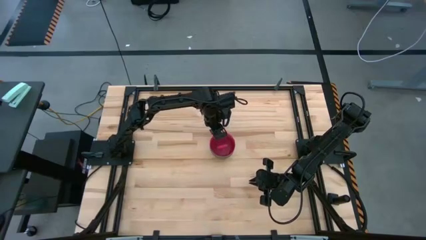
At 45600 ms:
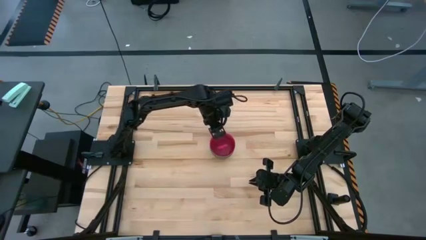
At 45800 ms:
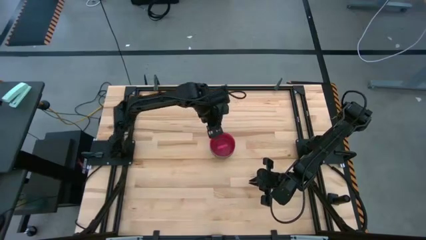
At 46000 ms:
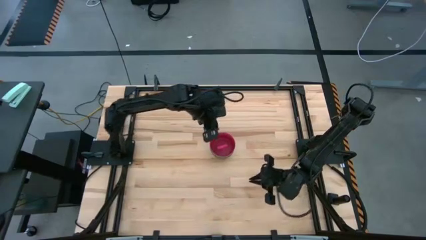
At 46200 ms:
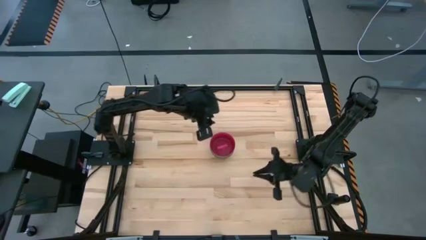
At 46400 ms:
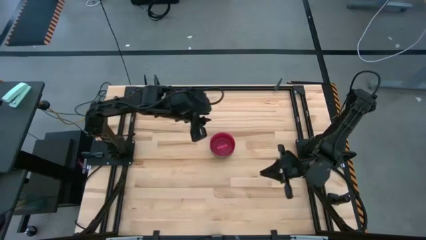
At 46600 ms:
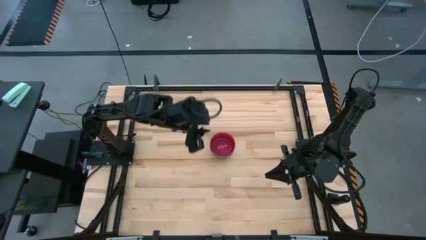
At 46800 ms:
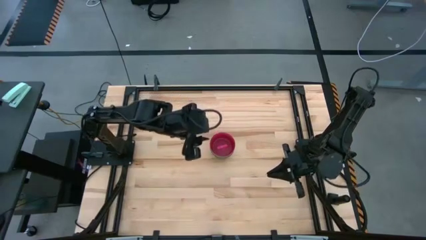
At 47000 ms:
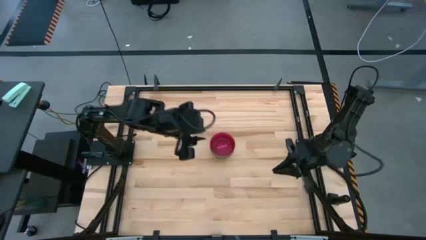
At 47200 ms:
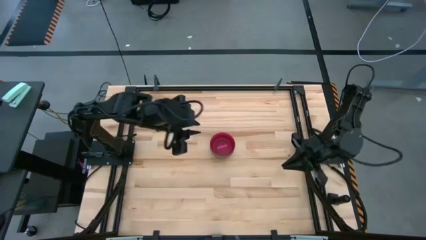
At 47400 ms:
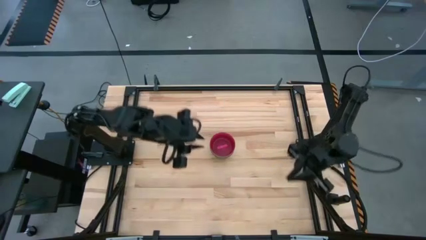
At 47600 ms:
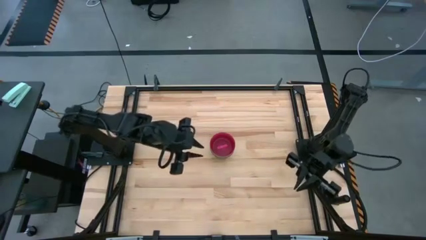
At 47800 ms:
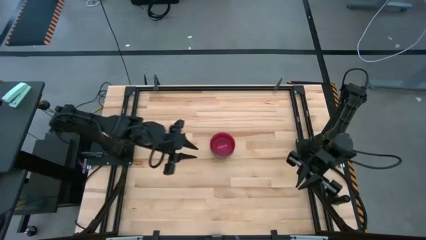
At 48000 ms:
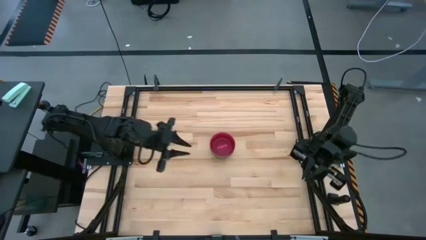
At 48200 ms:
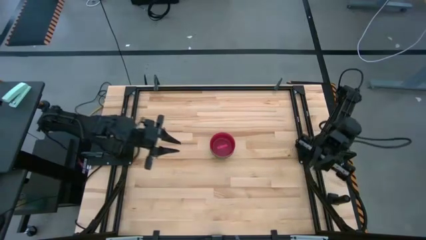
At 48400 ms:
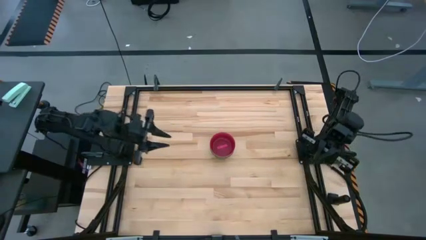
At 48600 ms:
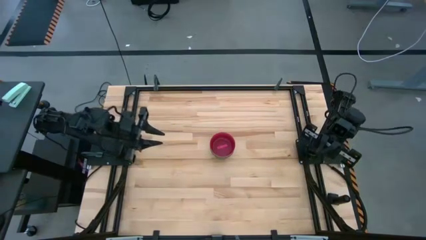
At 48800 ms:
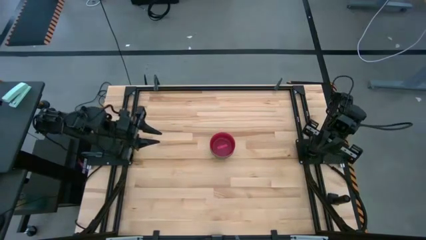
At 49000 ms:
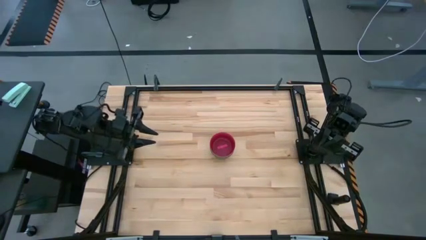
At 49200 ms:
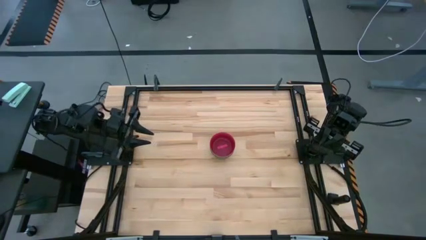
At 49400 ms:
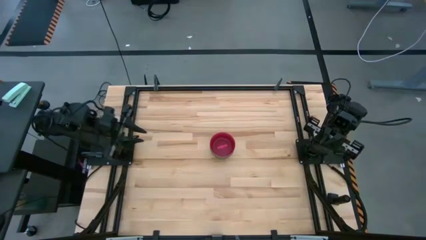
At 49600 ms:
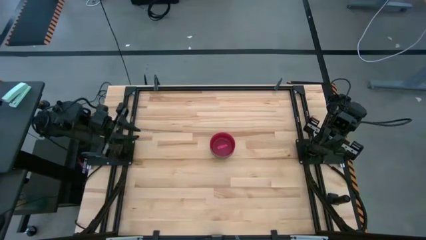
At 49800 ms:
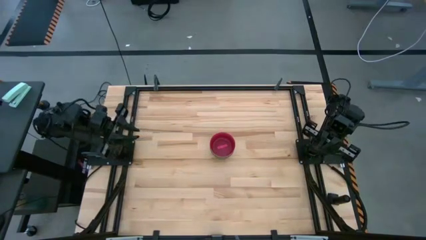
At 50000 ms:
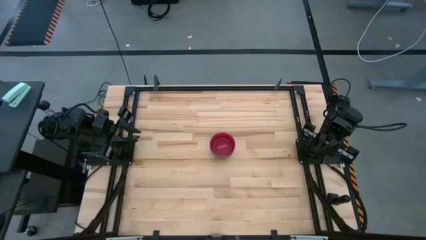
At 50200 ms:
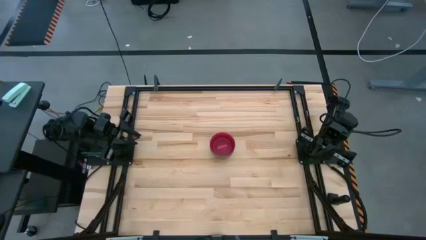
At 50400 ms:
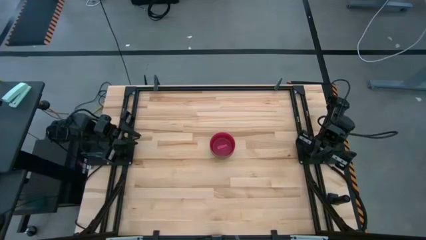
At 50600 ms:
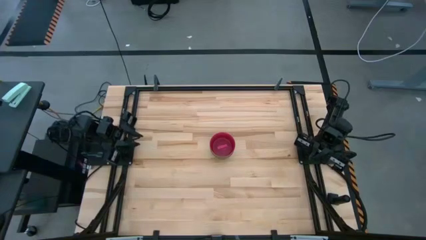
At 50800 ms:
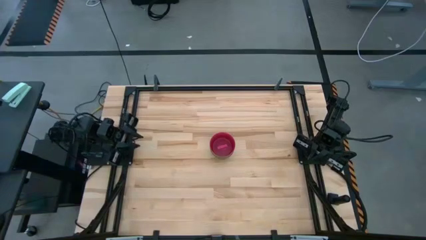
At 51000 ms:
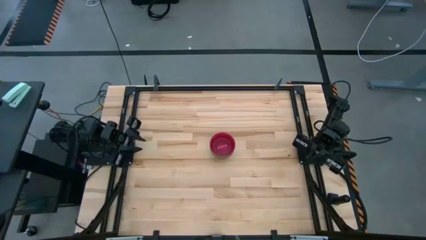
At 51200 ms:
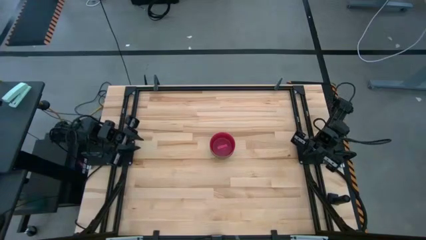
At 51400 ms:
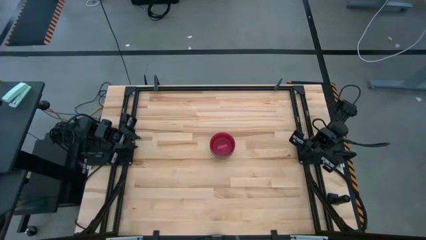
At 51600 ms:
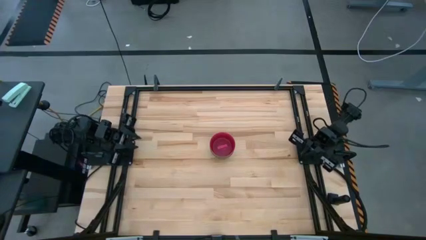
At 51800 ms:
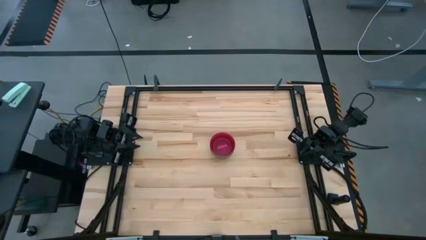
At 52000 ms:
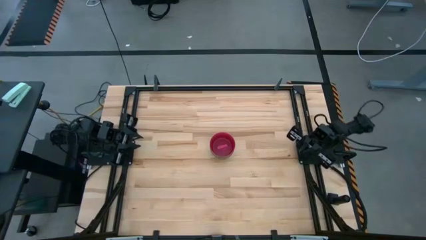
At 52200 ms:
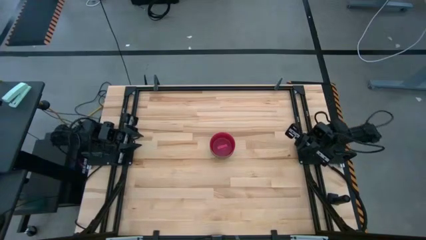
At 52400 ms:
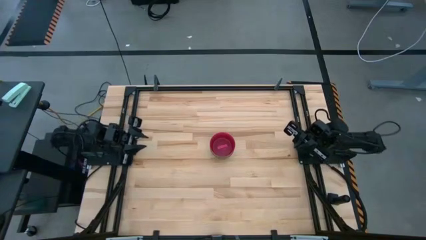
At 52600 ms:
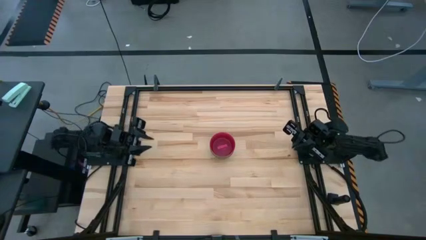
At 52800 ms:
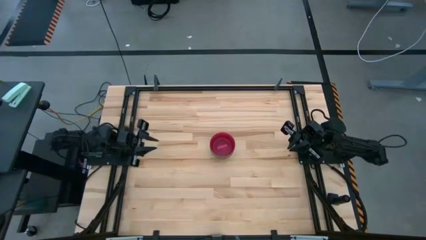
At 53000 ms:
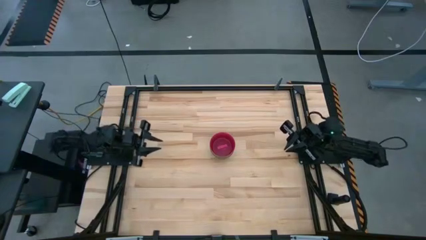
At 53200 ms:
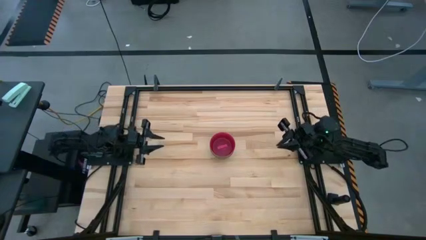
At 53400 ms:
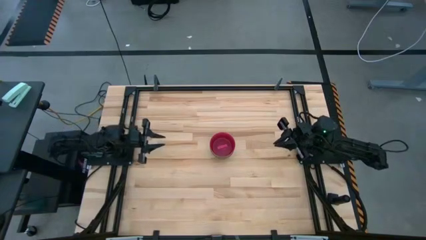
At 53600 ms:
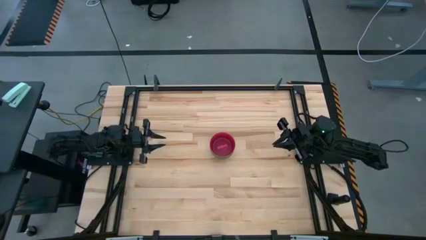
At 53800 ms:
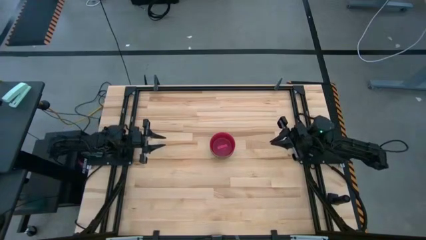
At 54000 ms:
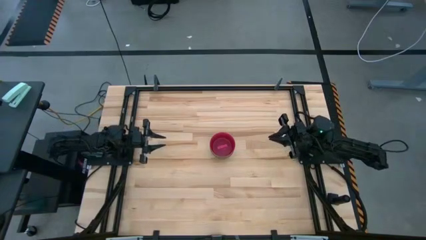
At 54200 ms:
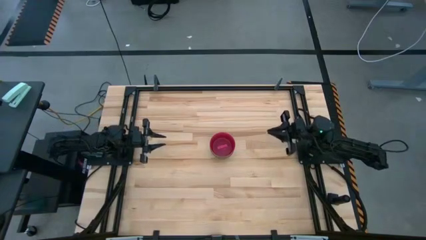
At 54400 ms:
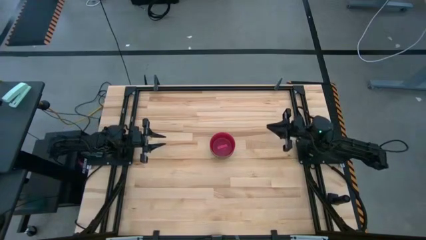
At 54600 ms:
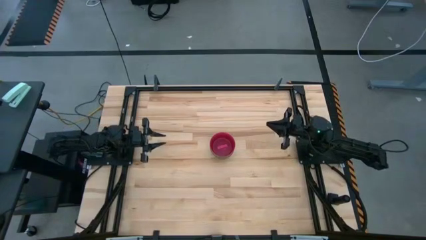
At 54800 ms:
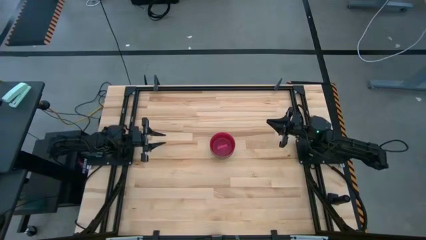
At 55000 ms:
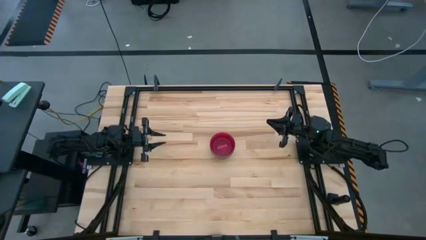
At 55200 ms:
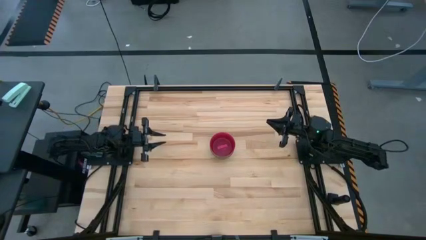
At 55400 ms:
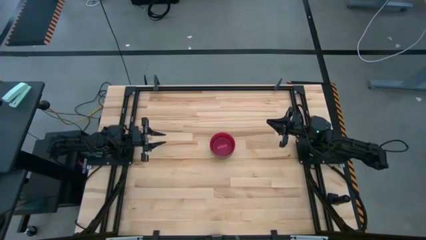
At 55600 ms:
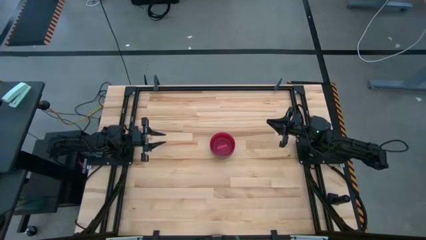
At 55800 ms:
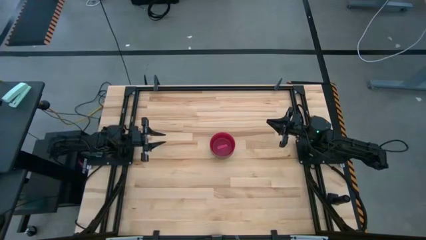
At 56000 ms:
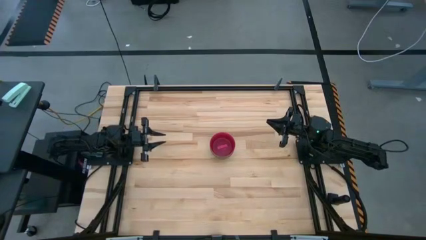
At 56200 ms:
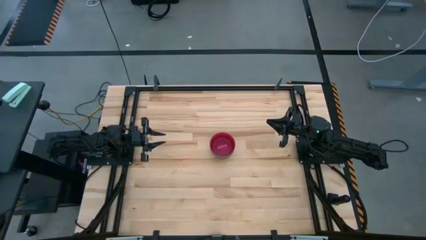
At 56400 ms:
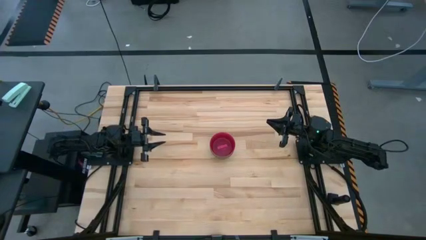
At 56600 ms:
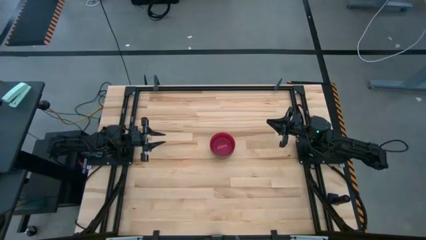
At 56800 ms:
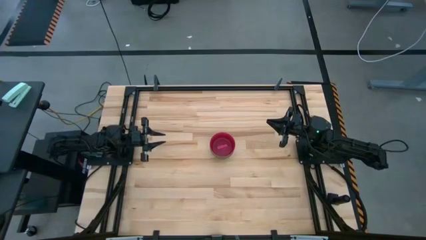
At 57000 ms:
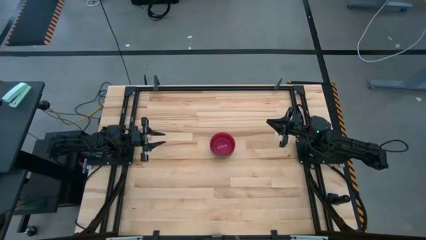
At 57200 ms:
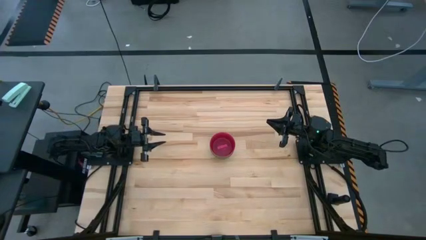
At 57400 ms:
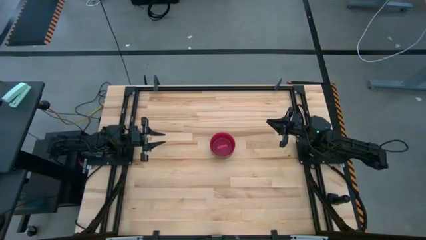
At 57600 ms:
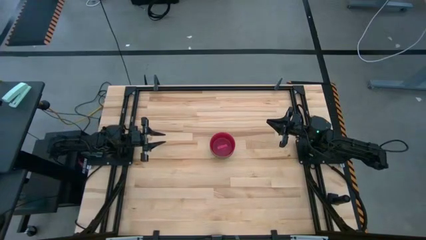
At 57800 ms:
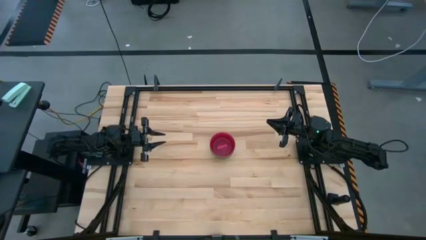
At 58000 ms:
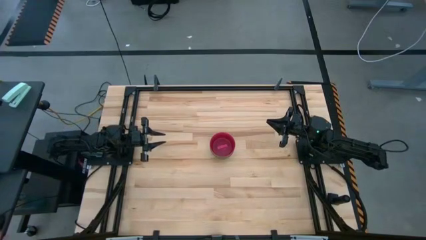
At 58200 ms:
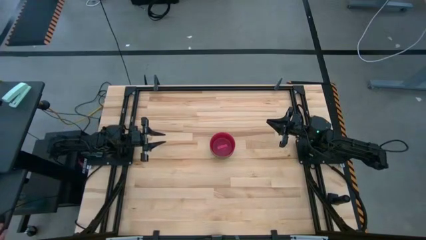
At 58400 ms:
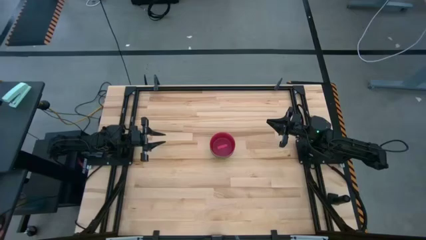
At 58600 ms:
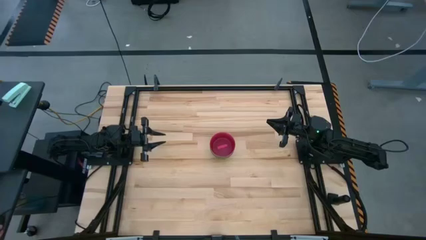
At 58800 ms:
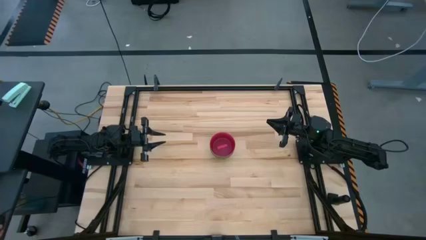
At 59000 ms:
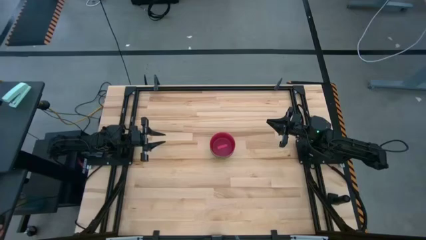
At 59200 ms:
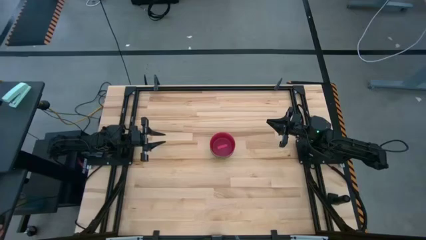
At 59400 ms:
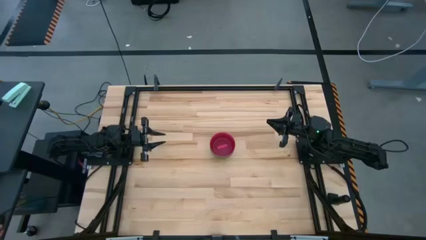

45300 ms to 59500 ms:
Task: Nest bowls inside each other
Return to Home Position

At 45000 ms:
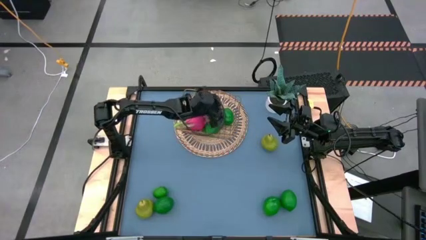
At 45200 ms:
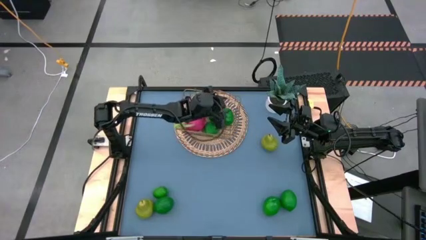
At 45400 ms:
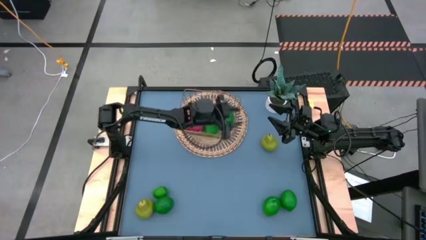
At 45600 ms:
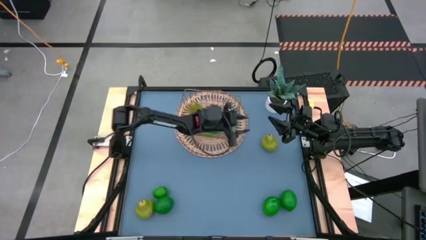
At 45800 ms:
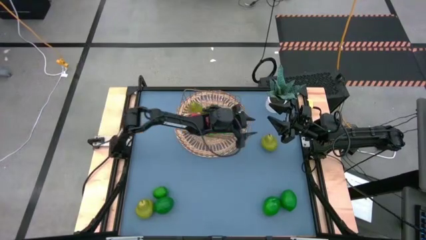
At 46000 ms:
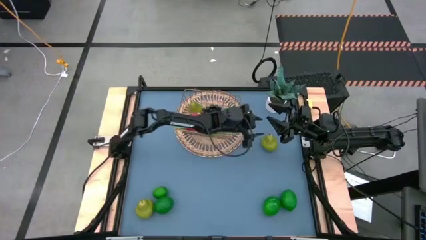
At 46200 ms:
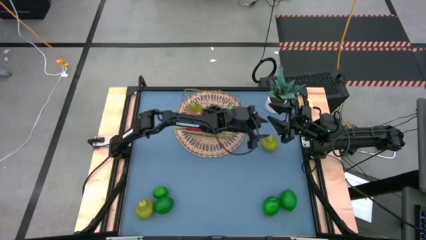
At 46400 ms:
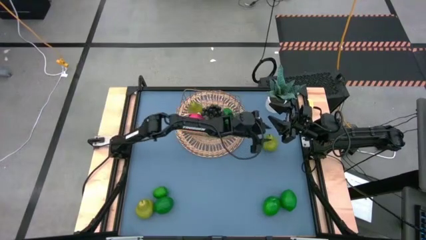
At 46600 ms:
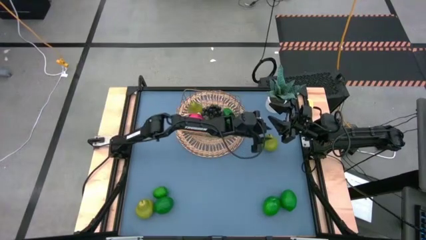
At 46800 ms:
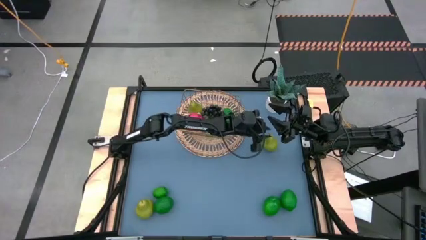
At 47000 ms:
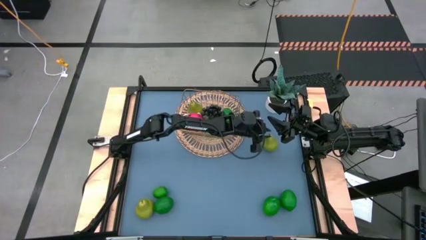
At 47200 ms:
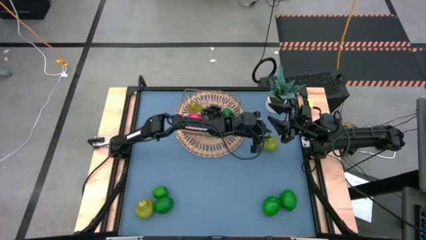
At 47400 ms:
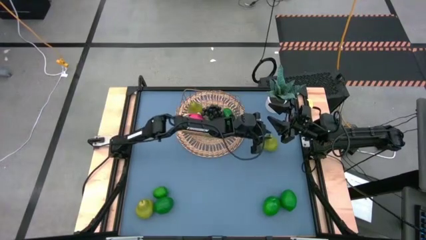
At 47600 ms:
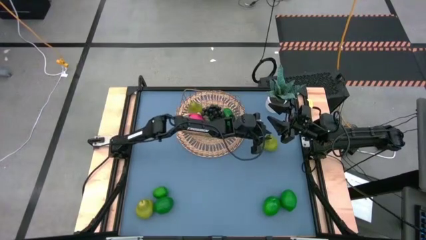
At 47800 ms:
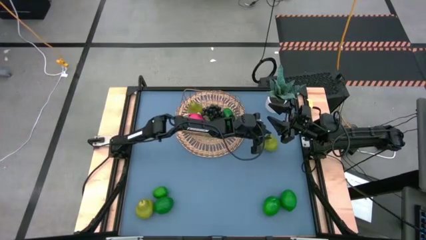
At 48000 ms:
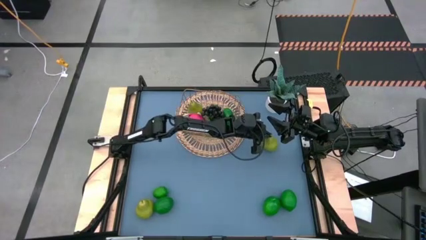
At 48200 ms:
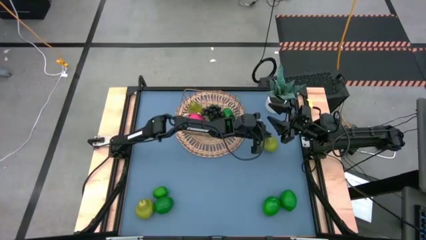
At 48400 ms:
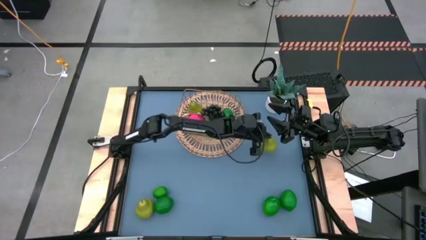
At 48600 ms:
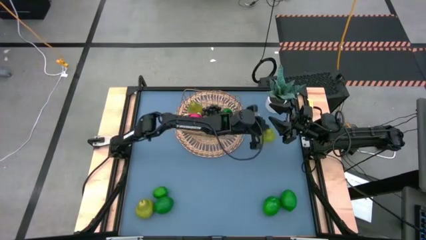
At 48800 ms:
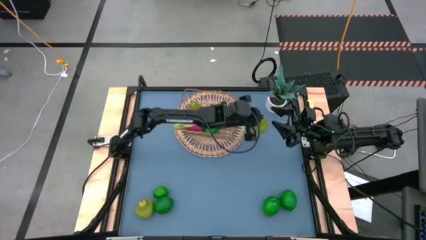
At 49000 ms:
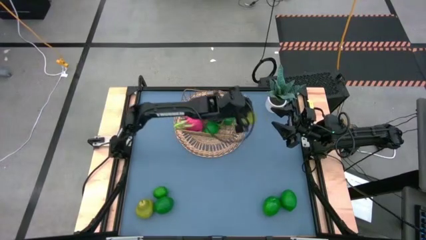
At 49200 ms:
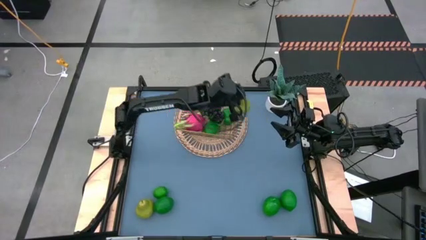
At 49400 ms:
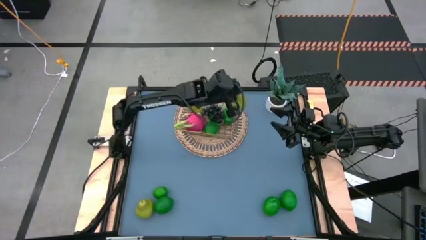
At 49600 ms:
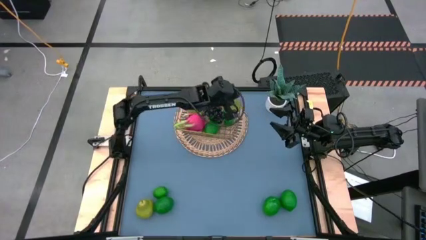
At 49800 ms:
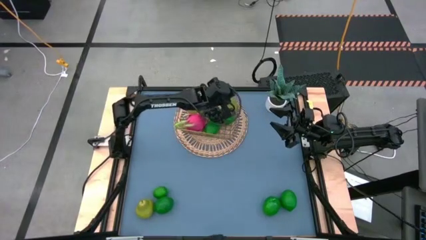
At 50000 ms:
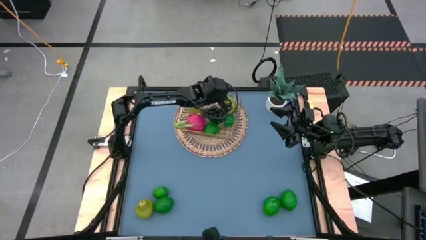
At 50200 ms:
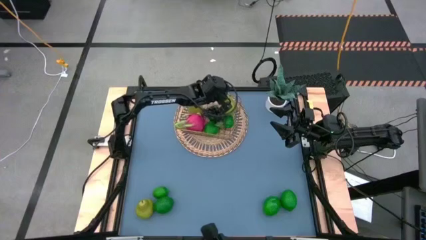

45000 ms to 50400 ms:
Task: Build produce basket
Put the green pear into the gold wire basket
